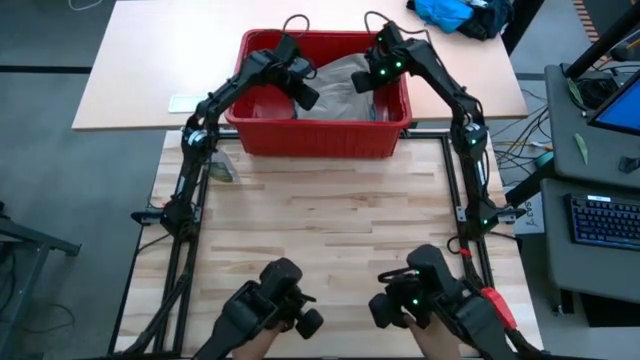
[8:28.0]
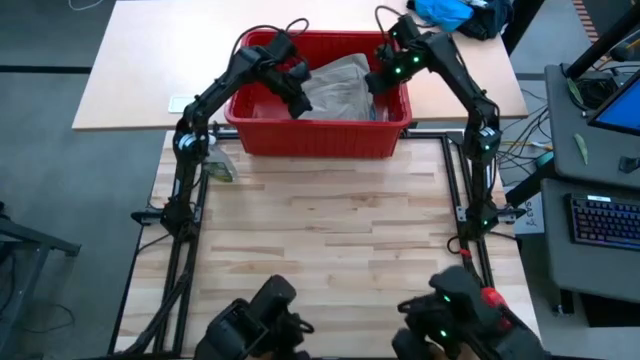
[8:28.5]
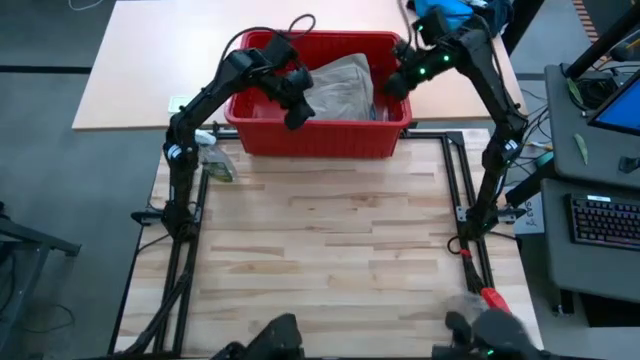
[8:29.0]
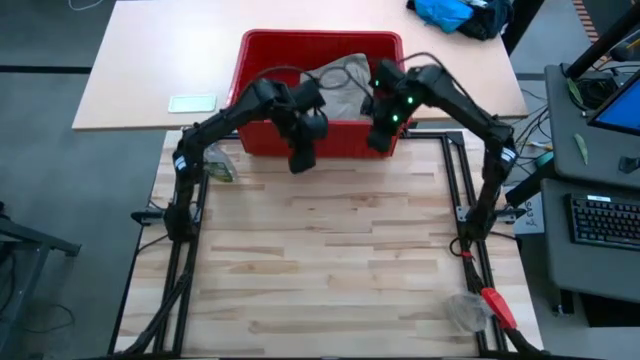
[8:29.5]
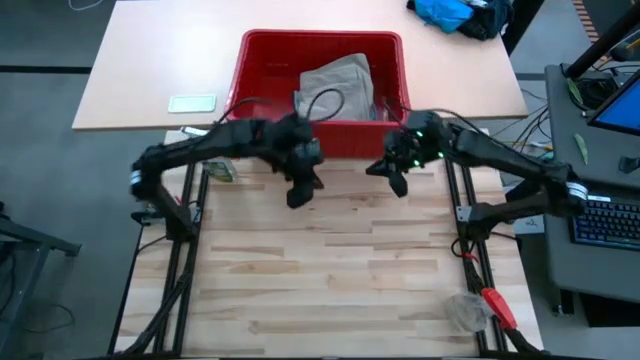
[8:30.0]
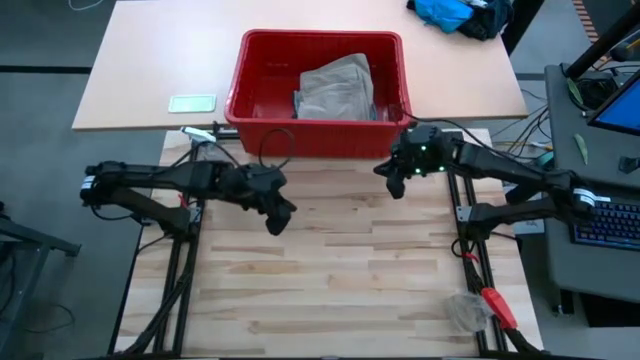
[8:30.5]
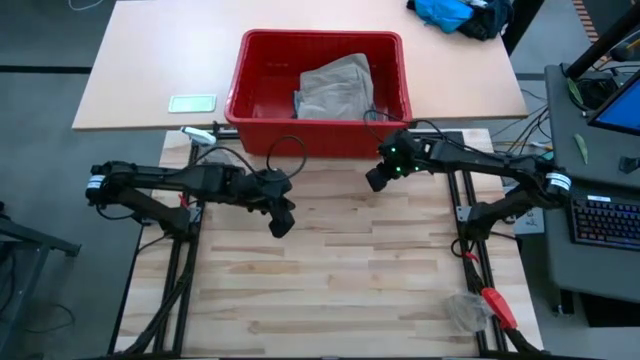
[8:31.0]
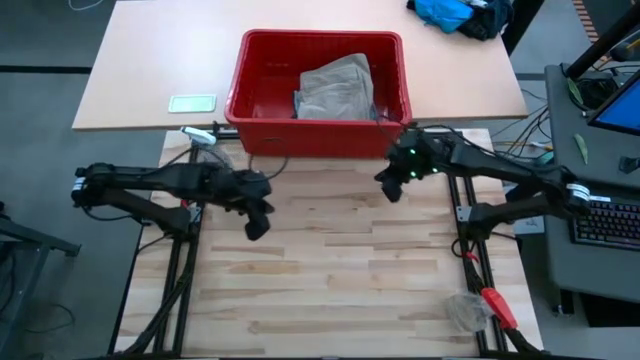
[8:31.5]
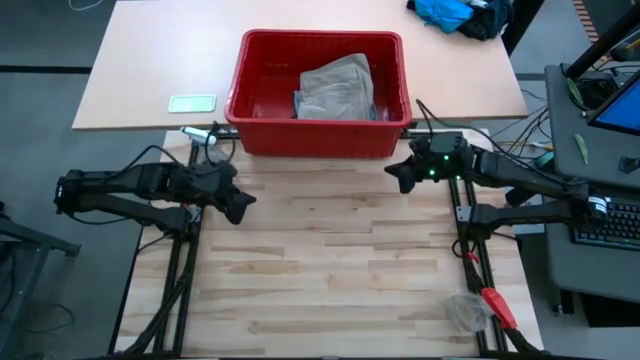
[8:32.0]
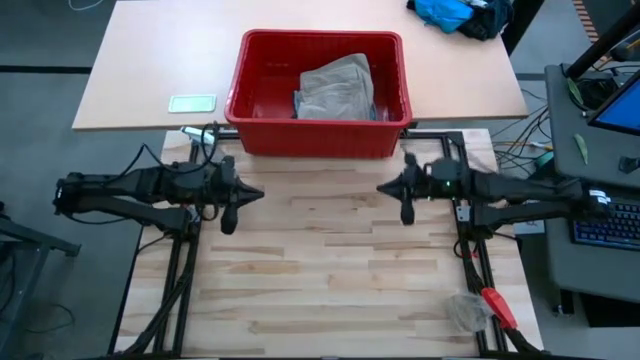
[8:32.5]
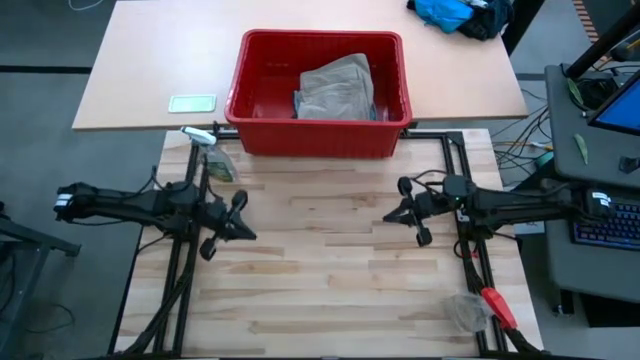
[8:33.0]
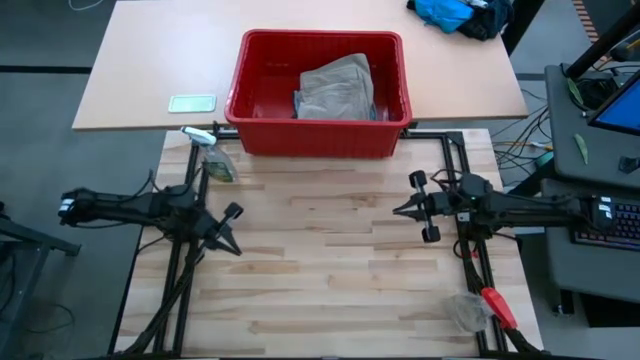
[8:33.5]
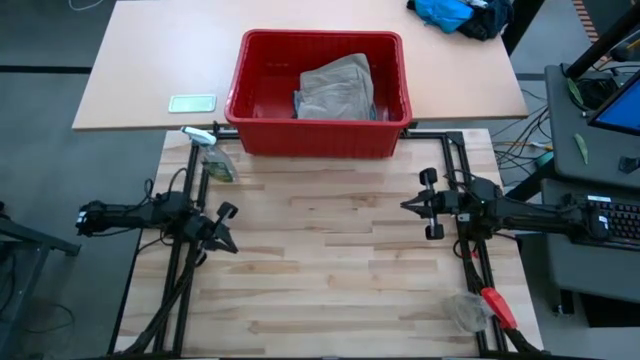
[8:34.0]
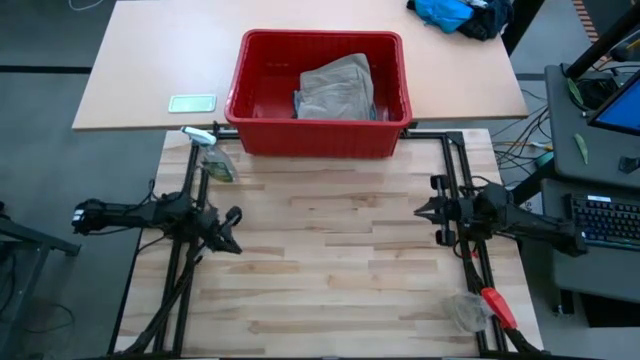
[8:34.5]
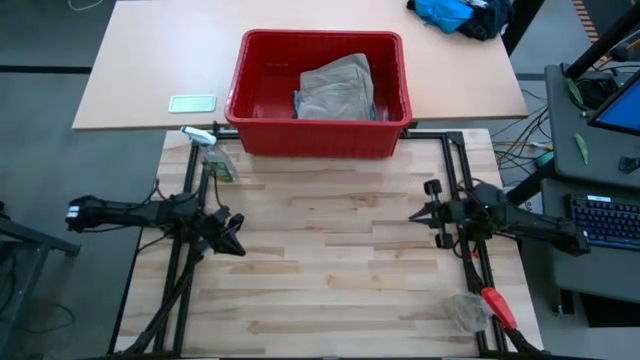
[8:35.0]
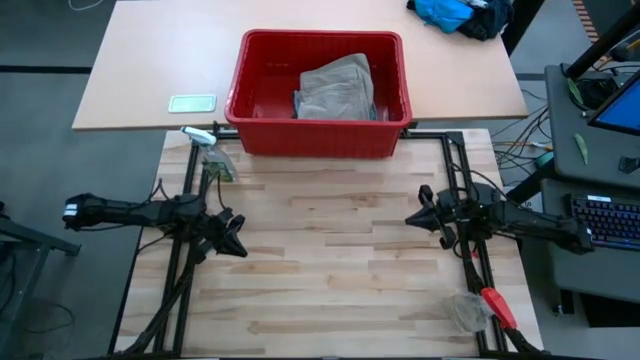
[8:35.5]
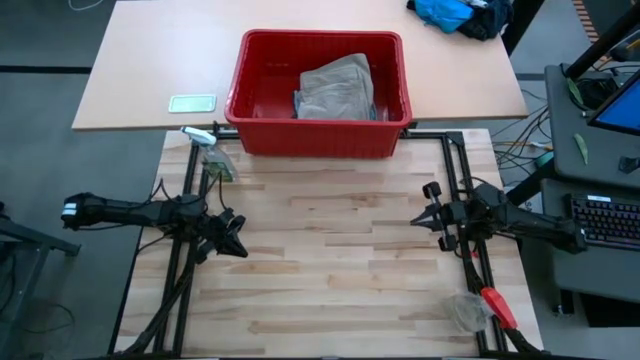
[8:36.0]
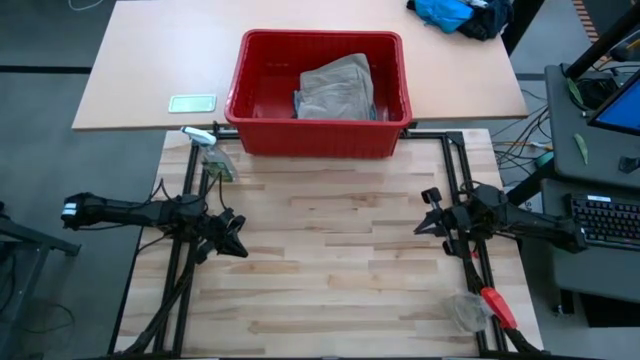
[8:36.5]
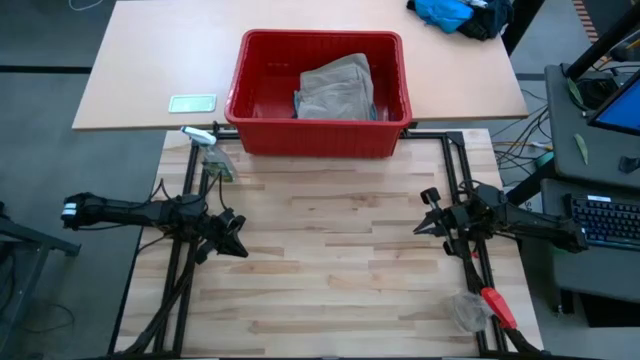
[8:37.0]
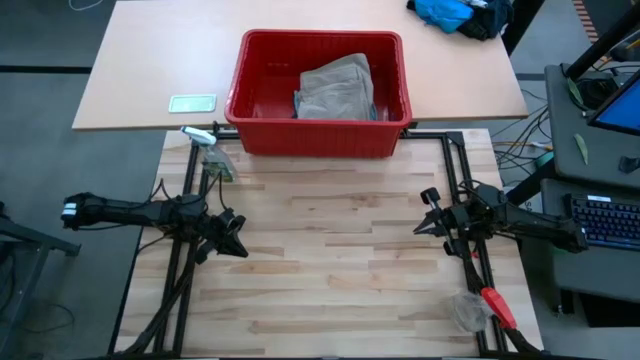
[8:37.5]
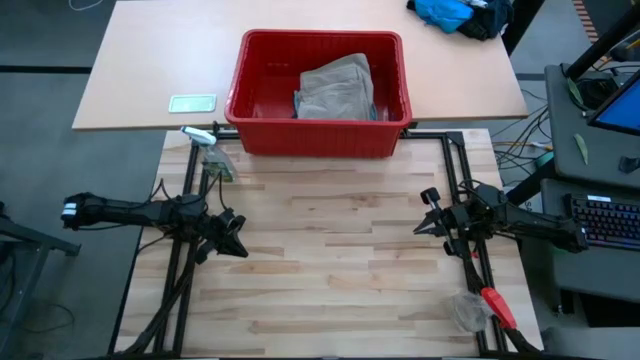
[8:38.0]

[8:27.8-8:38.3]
Task: Fold Laundry from Bin
Return to Home Position

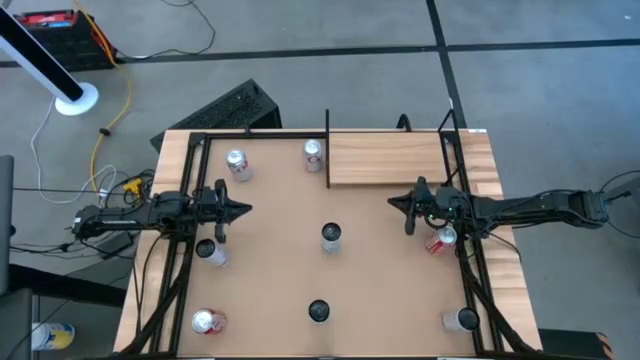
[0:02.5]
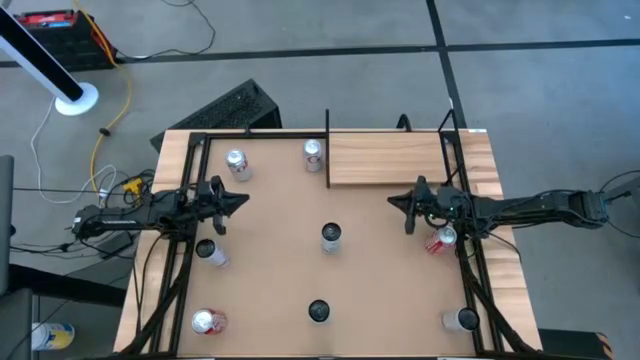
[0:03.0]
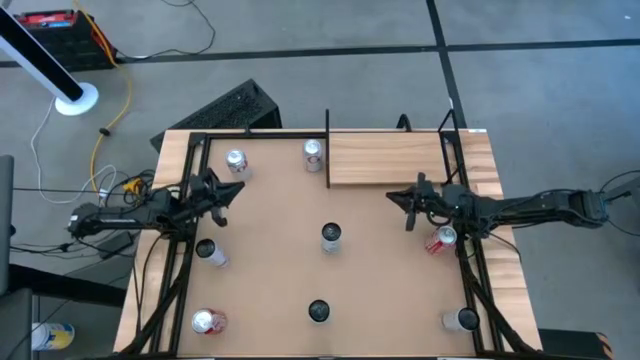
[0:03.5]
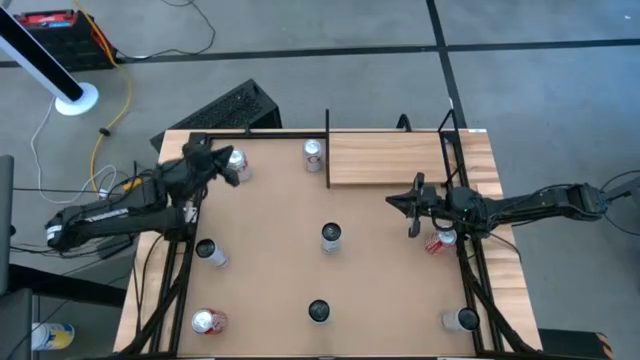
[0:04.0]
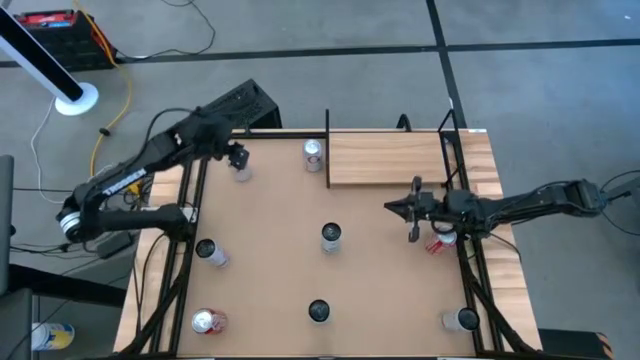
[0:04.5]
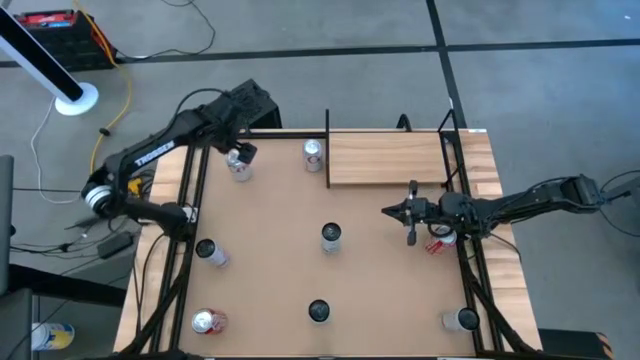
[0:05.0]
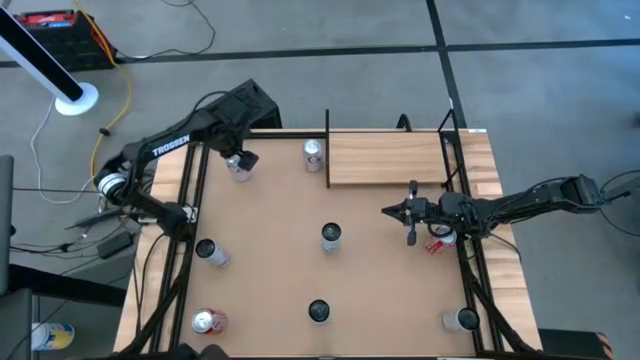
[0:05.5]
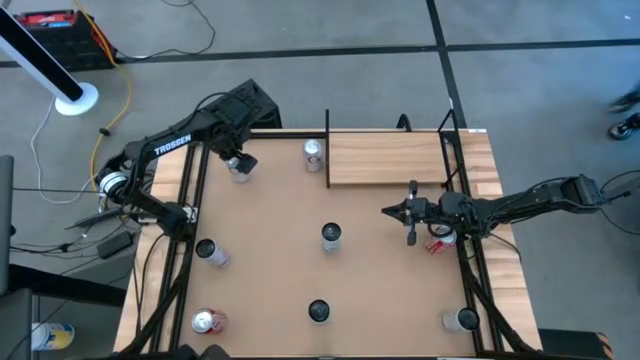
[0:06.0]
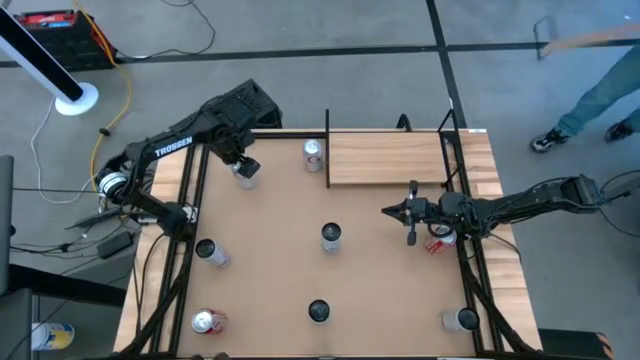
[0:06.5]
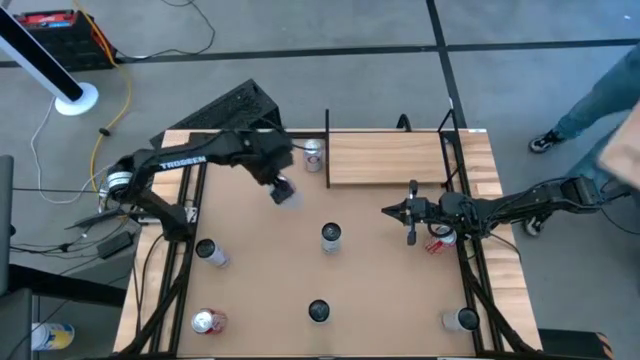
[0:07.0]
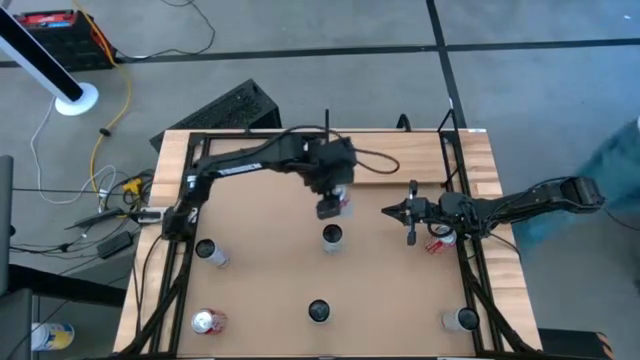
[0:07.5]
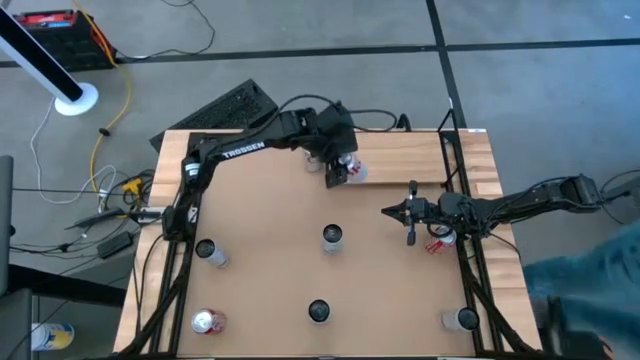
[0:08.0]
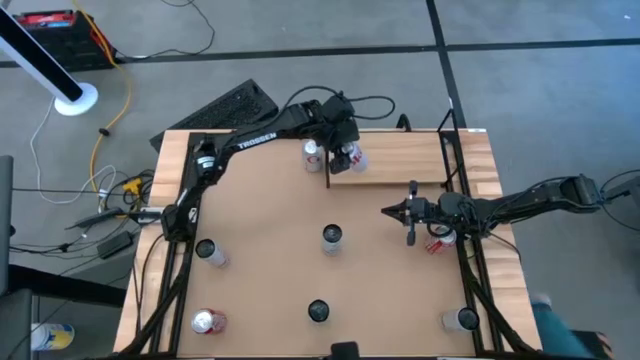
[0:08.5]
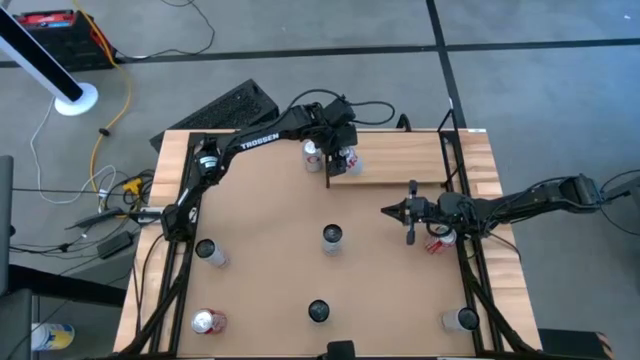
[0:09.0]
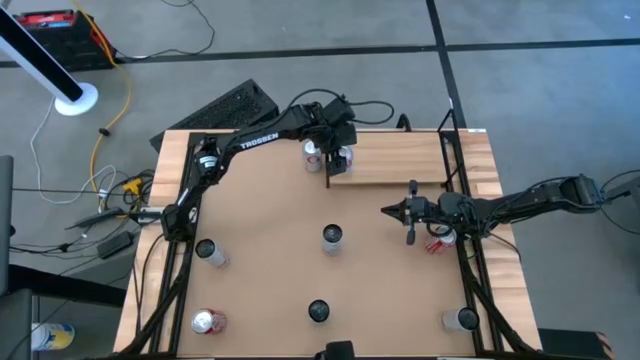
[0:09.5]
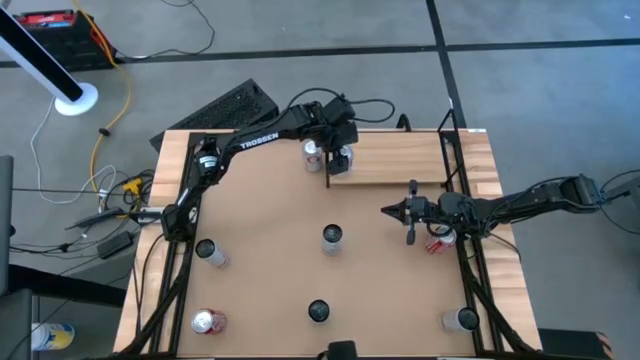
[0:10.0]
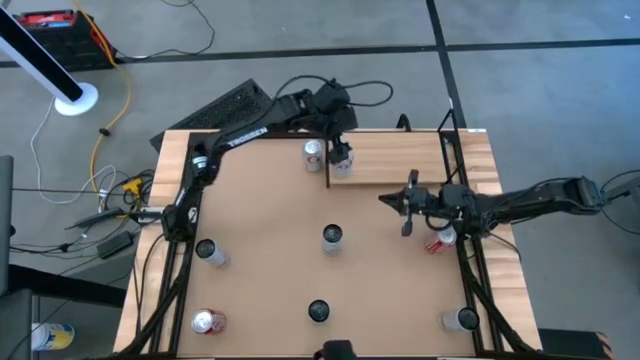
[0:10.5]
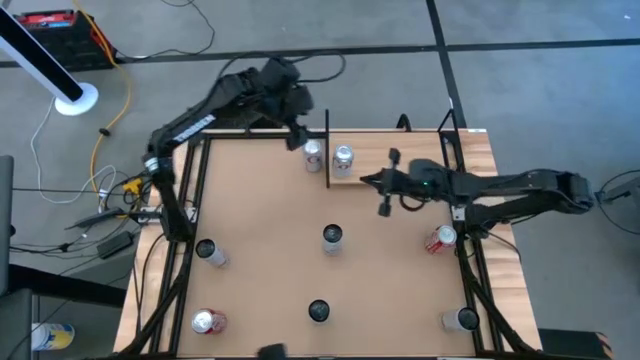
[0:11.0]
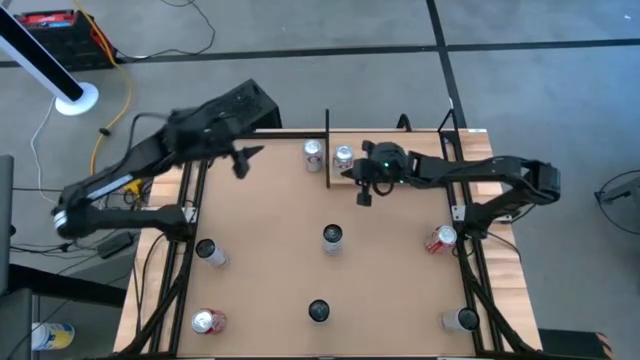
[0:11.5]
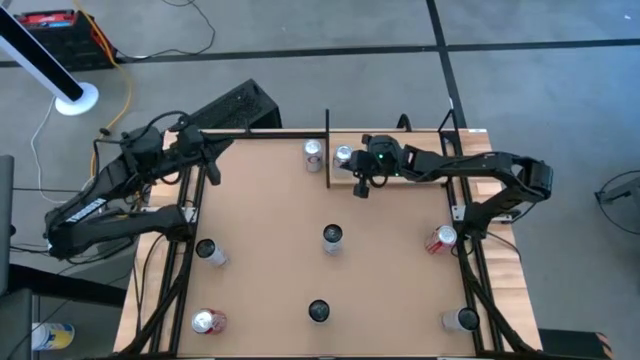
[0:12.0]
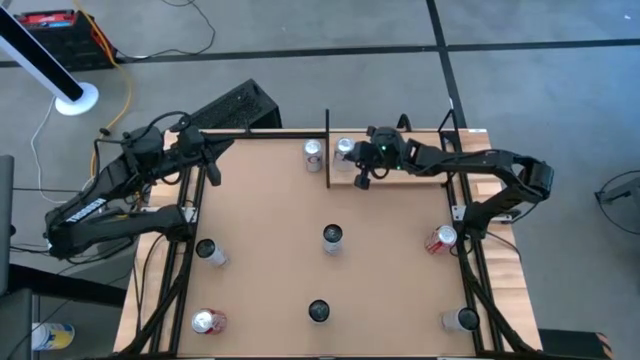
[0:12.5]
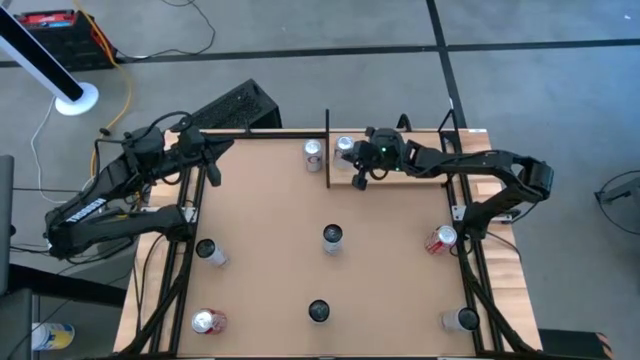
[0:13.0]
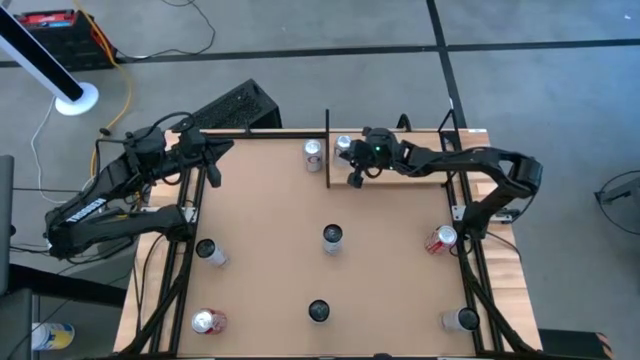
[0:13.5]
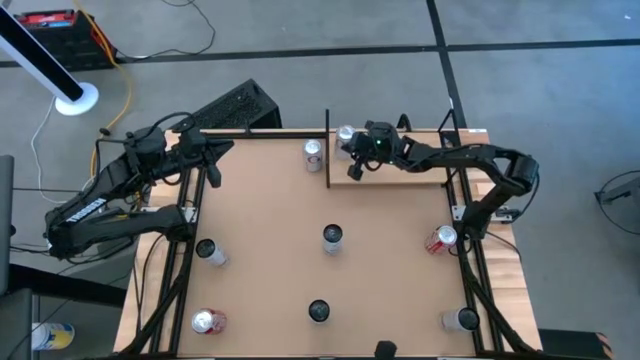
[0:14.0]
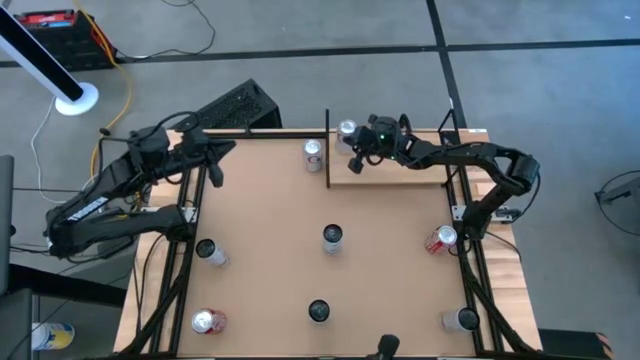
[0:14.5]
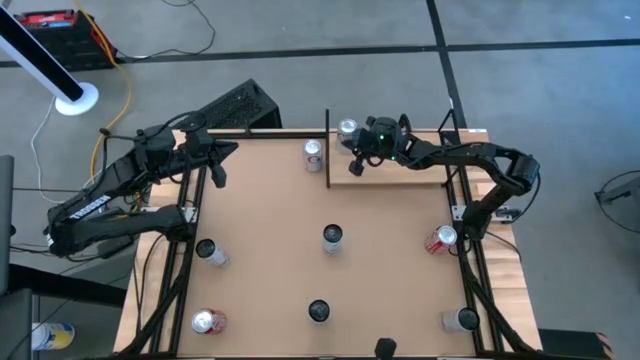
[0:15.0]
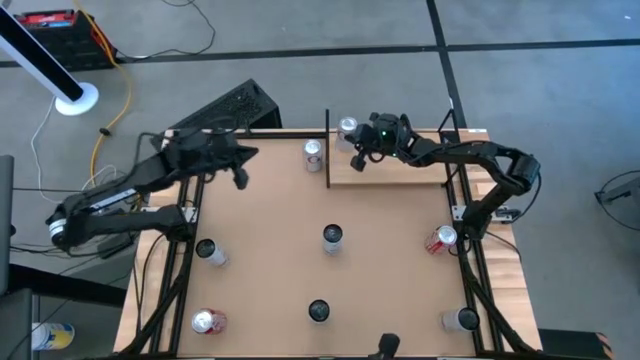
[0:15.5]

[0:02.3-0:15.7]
Task: Place canned beverage on shelf
Put the left red-silver soda can on the shelf
